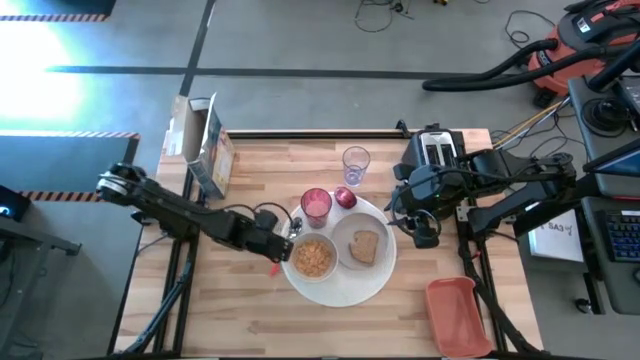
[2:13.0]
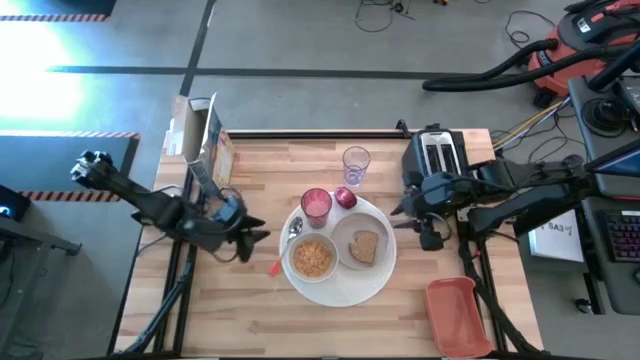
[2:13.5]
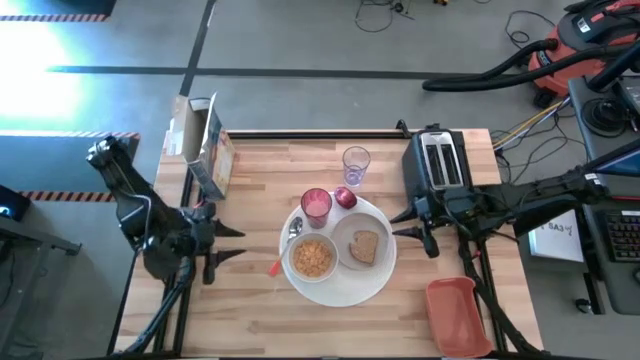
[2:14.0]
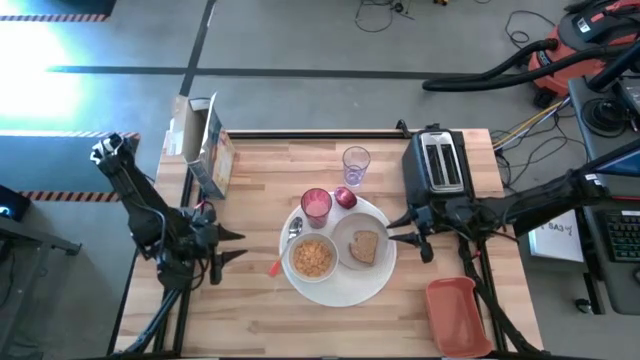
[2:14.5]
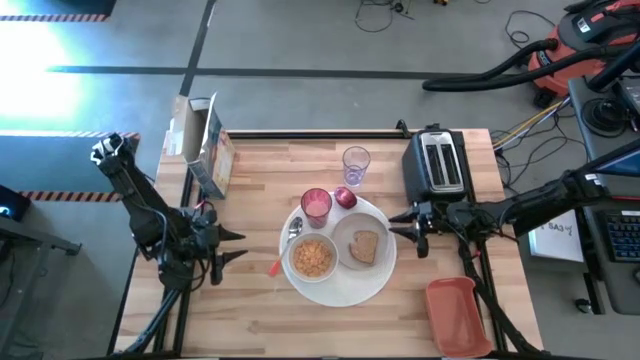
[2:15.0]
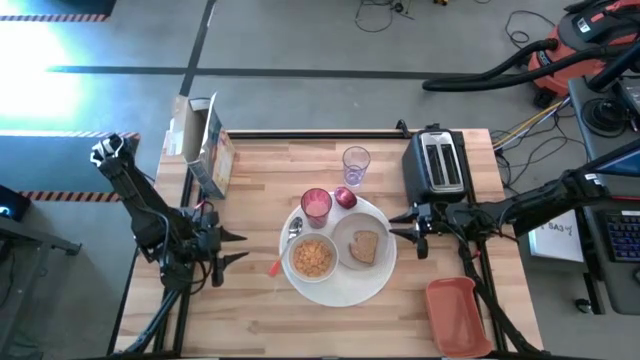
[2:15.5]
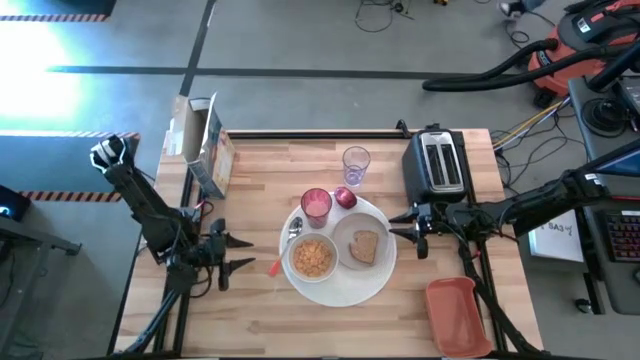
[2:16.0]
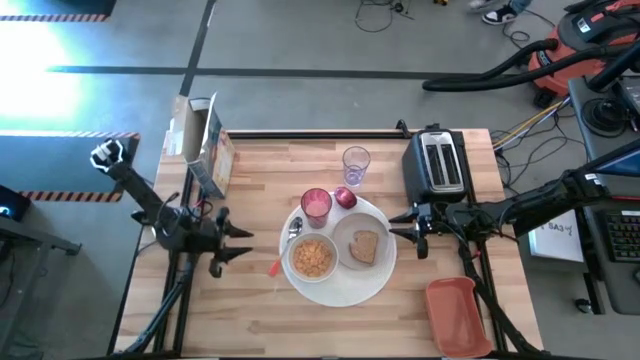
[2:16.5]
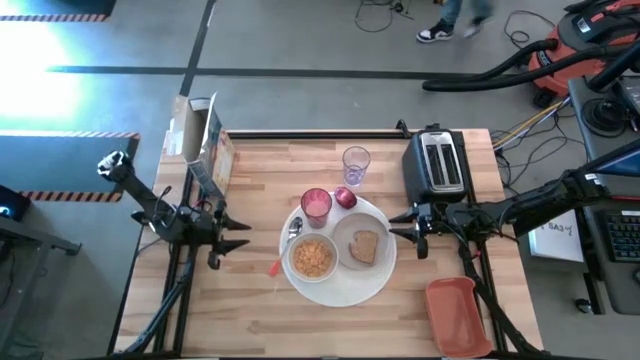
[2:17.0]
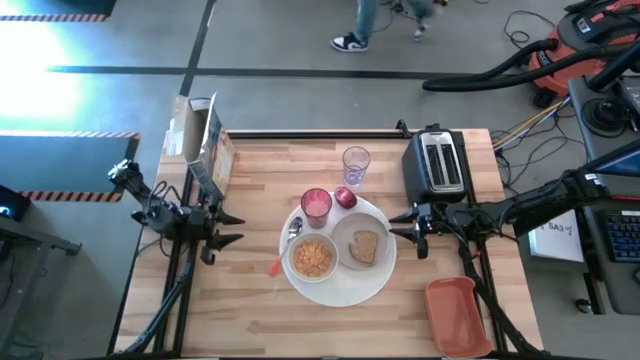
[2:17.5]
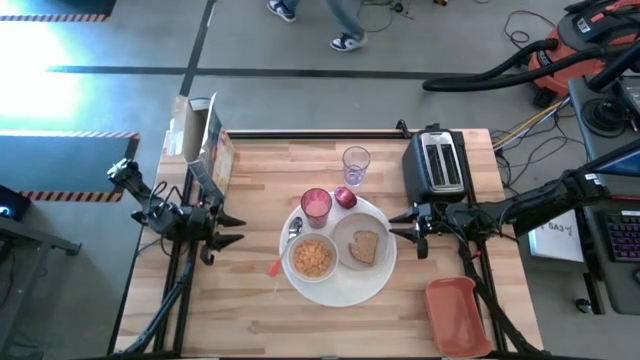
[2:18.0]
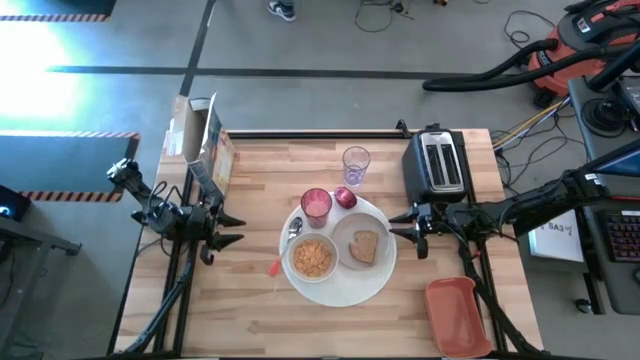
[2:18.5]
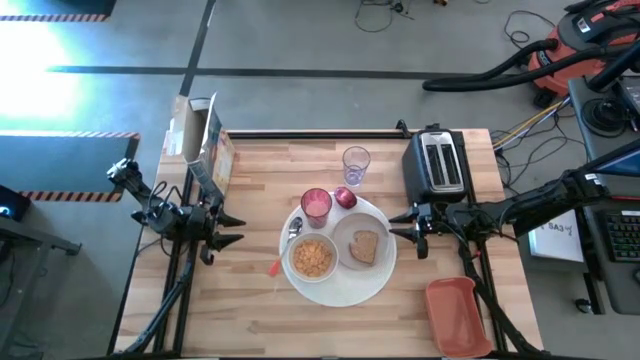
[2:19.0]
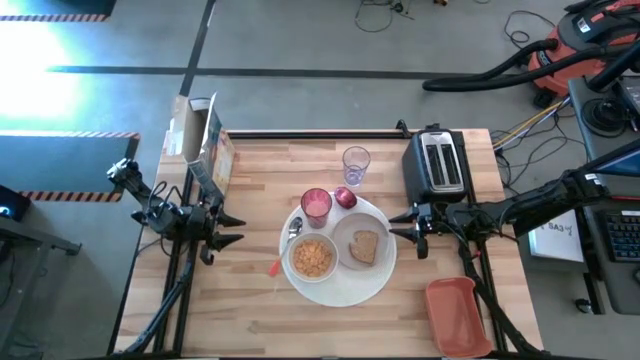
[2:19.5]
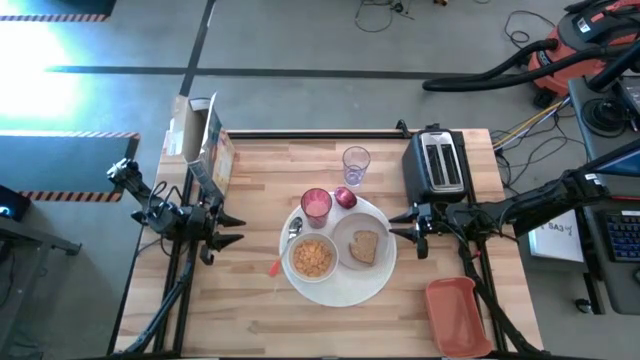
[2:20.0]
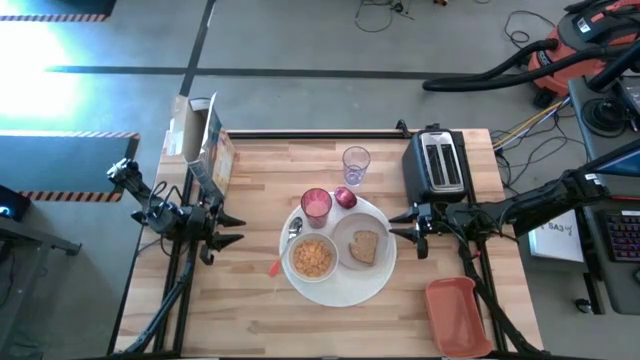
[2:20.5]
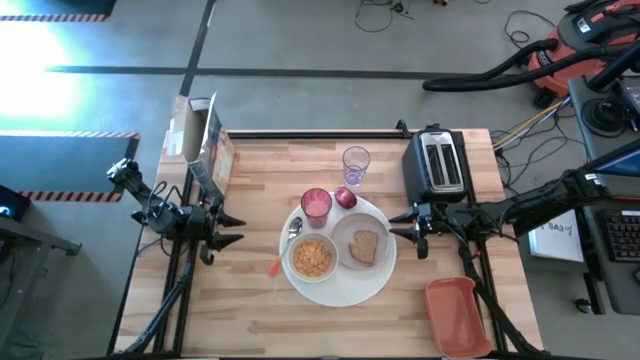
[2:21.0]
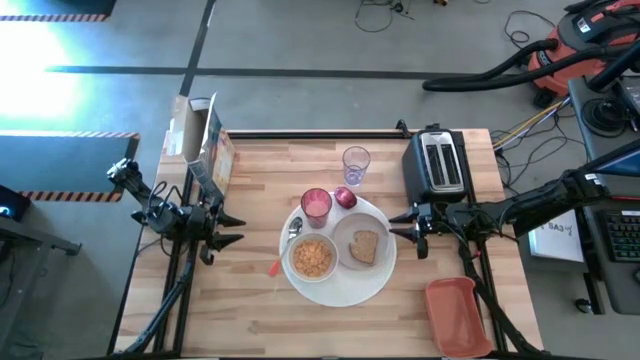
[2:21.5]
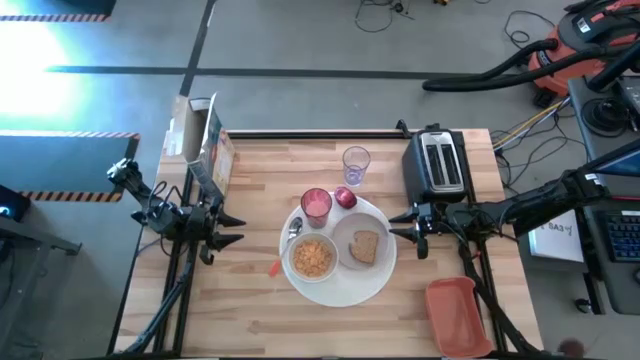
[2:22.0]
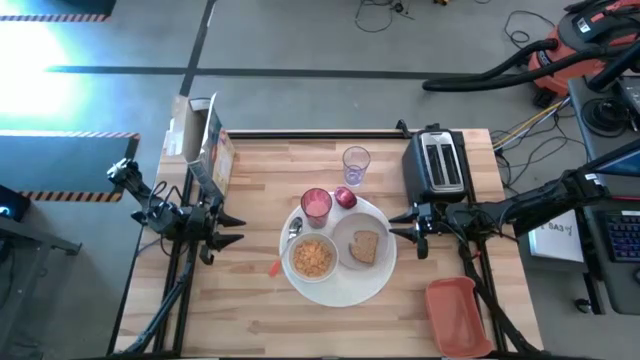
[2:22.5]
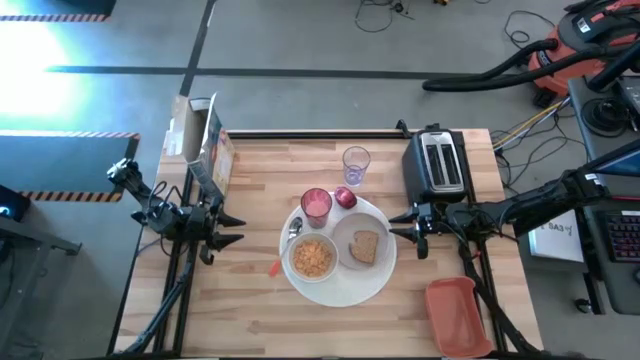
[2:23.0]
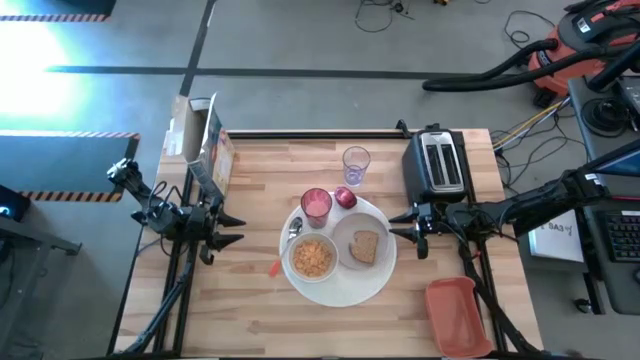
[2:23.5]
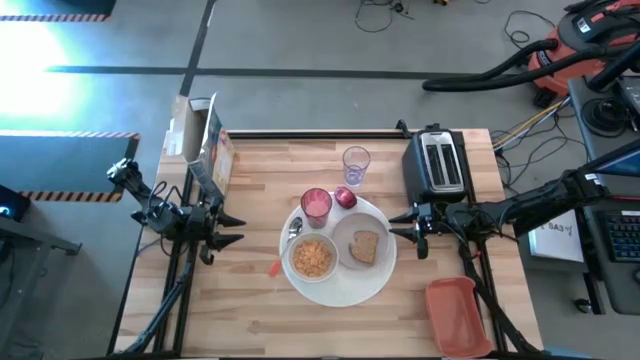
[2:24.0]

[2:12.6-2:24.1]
Task: Arrange a breakfast setting
Return to Home Position

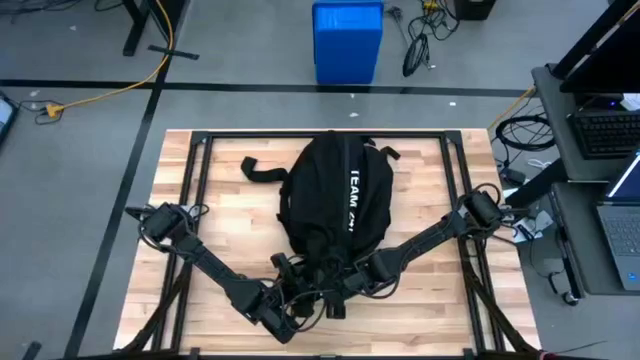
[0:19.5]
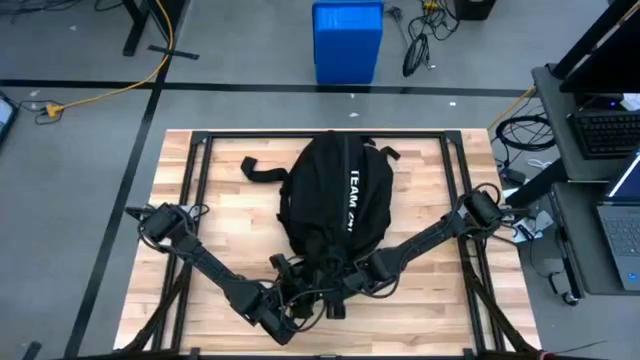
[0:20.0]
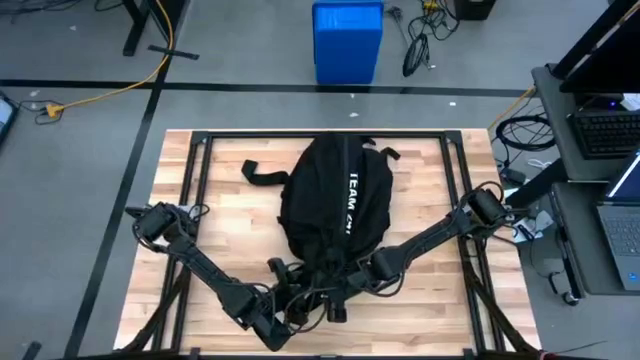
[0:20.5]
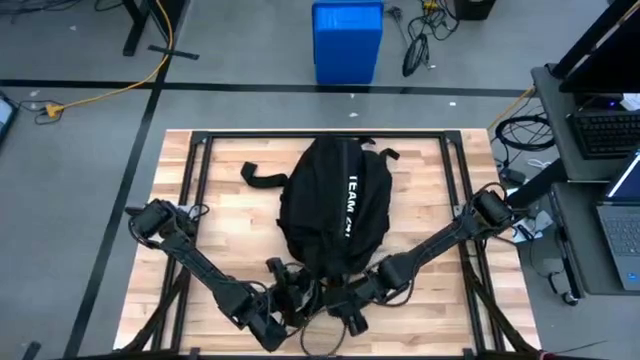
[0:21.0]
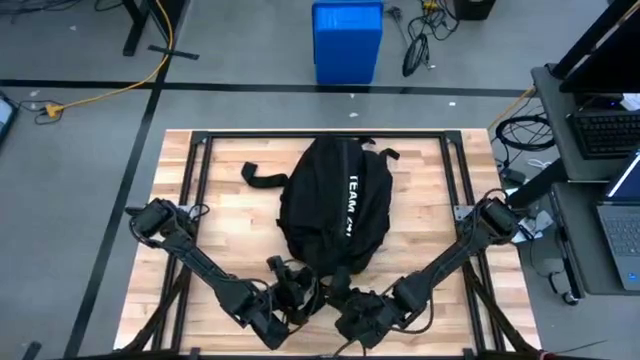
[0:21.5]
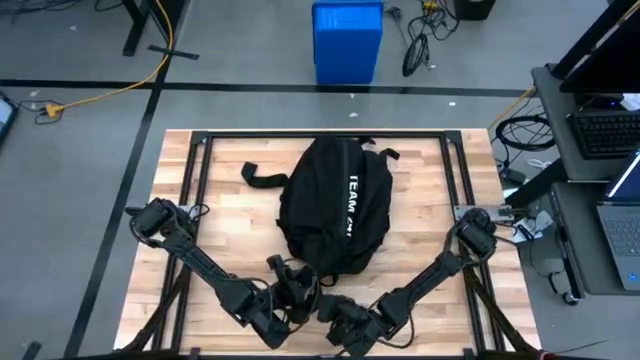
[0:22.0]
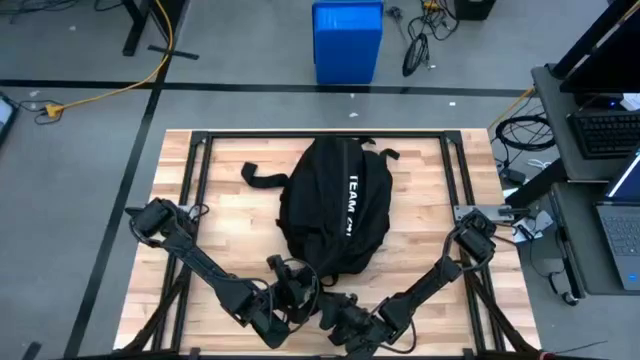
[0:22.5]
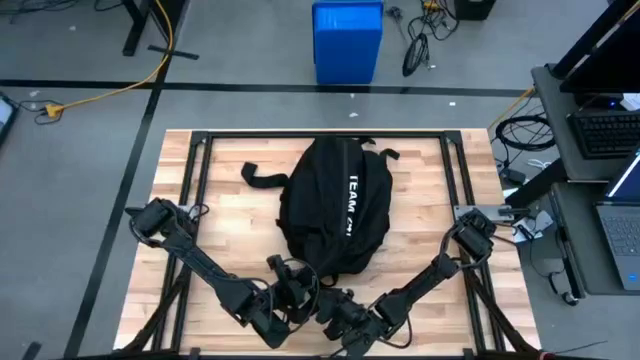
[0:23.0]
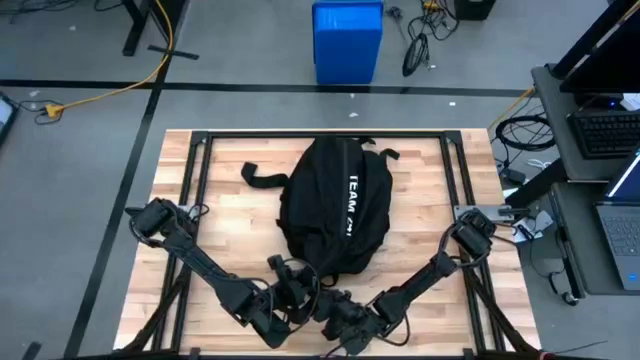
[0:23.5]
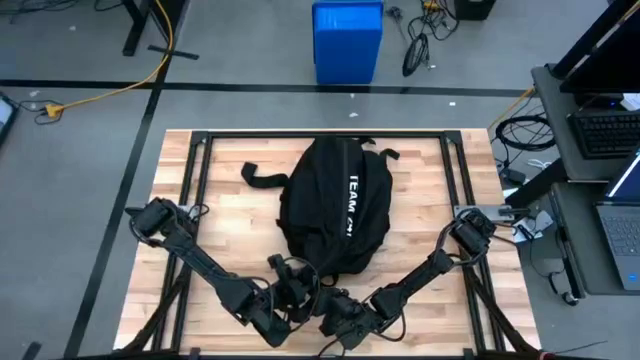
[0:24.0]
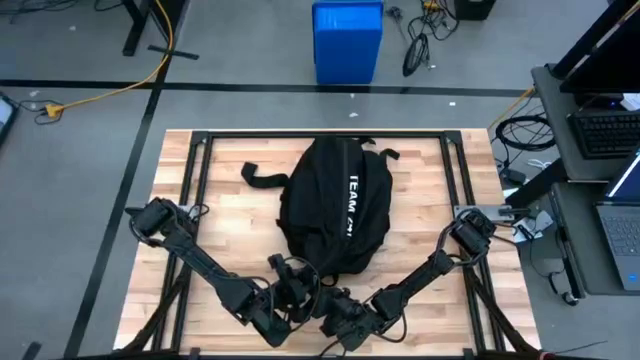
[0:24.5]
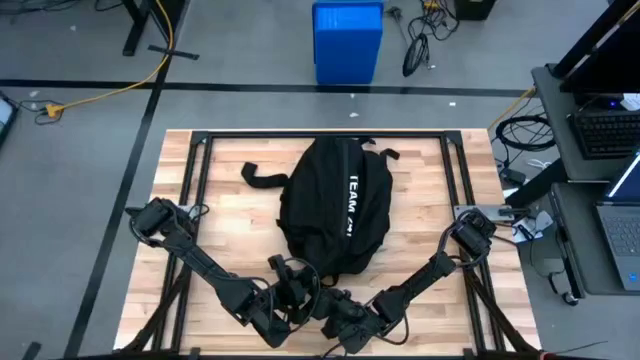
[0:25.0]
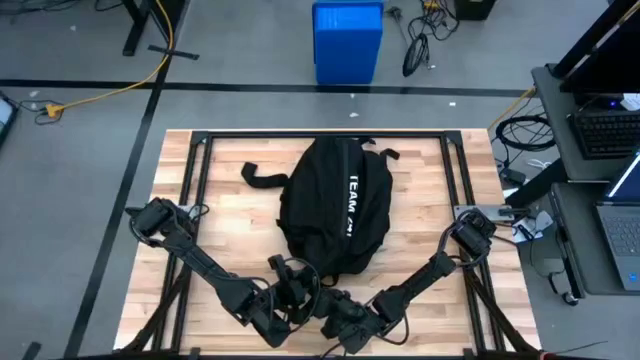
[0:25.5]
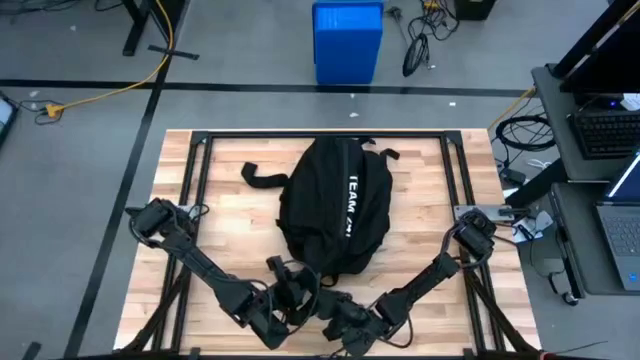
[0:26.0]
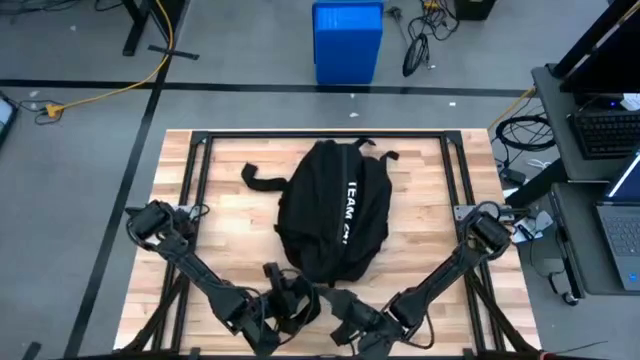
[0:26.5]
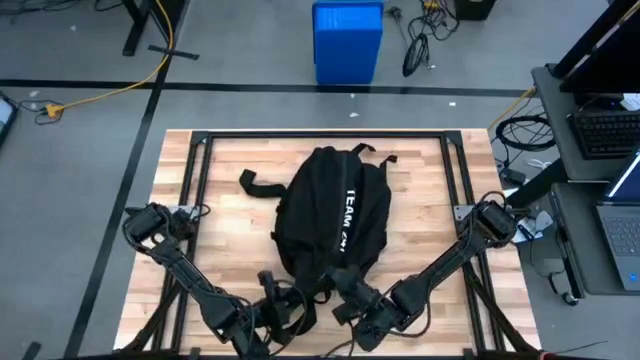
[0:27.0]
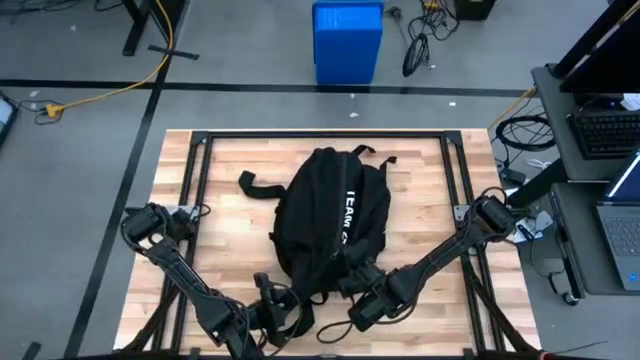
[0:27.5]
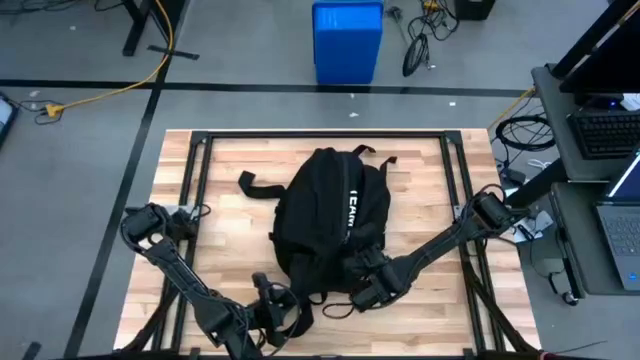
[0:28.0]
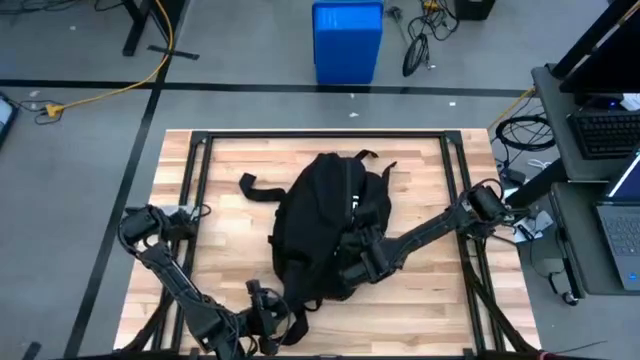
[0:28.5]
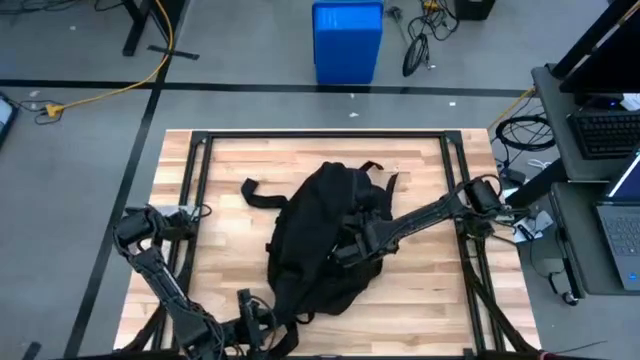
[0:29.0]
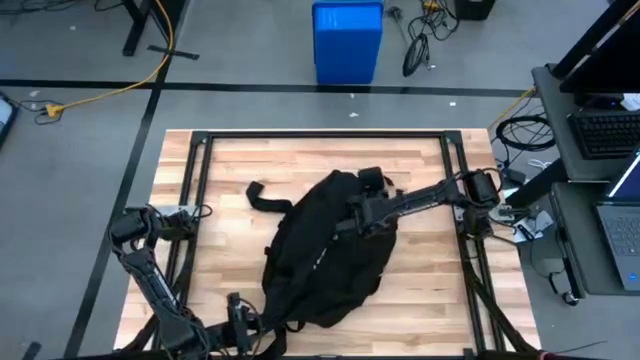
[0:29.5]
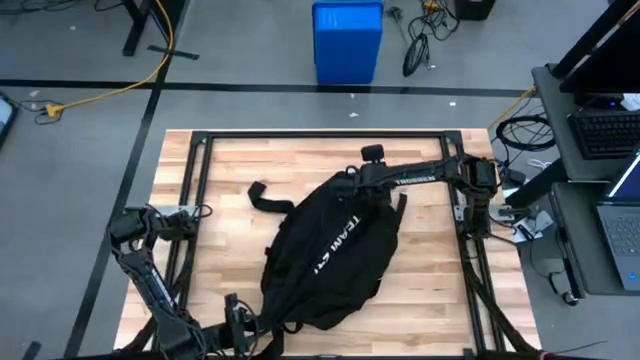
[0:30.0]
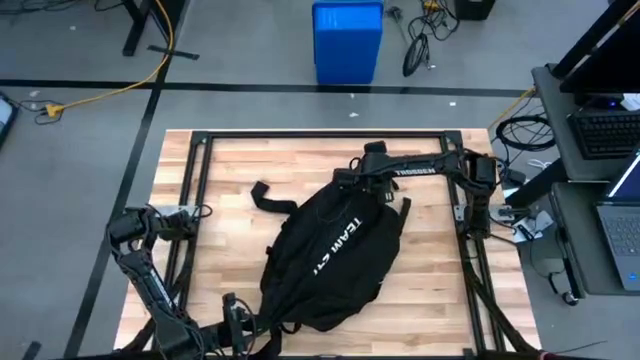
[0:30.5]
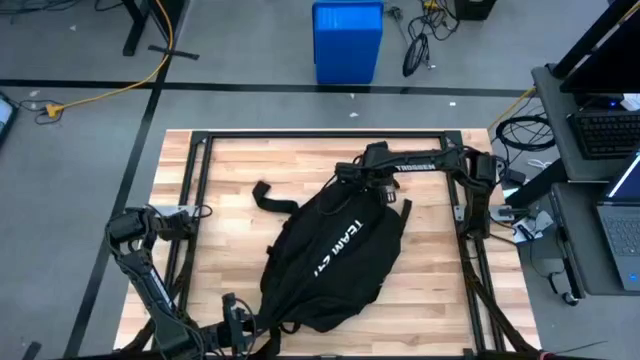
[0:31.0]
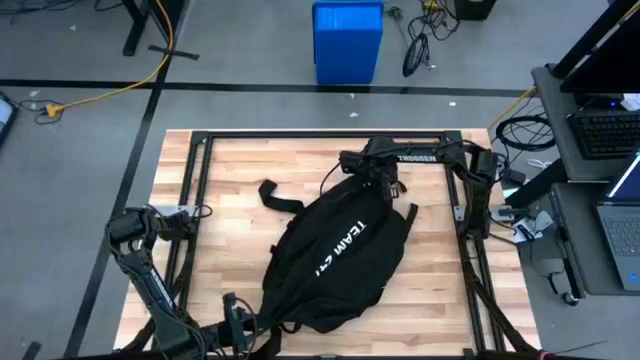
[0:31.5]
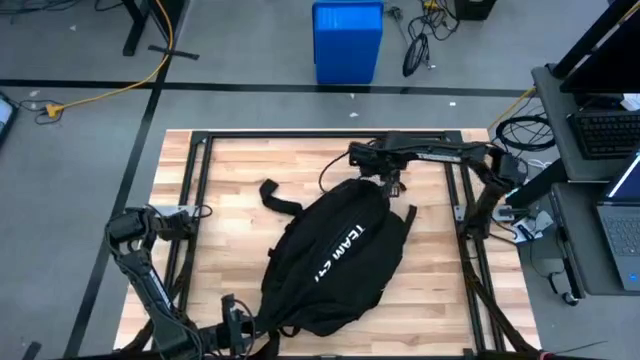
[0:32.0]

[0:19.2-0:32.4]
Task: Unpack backpack
Open the black backpack
